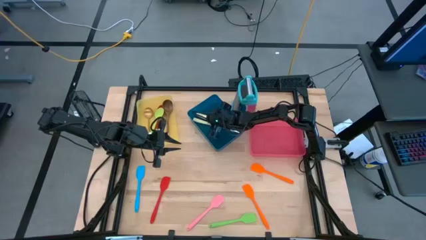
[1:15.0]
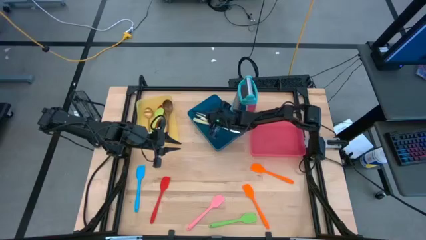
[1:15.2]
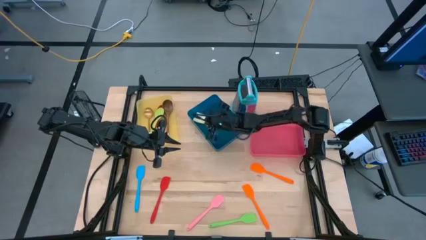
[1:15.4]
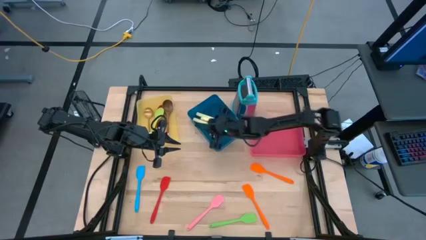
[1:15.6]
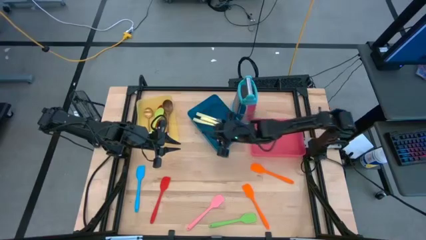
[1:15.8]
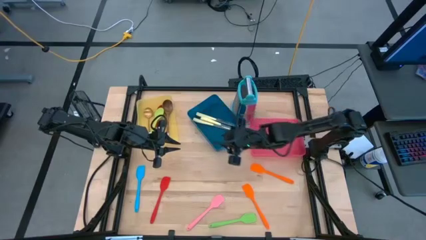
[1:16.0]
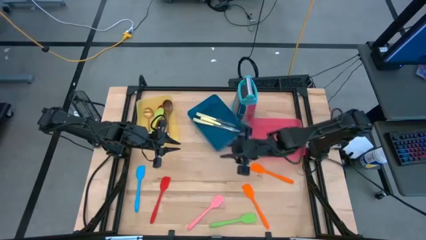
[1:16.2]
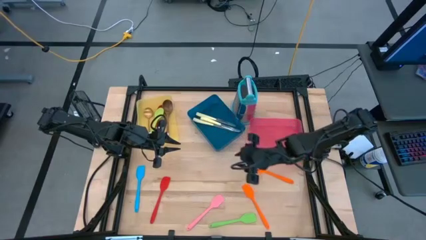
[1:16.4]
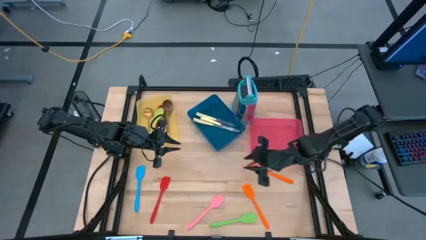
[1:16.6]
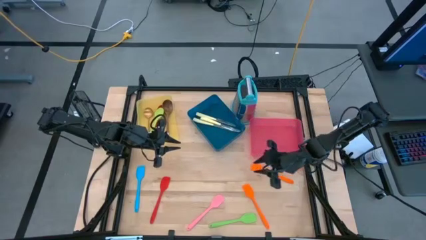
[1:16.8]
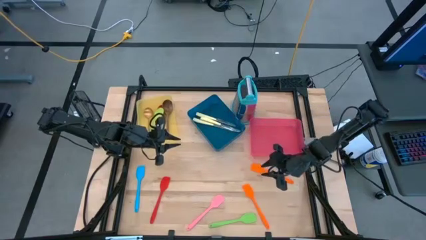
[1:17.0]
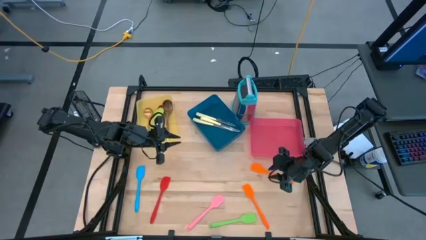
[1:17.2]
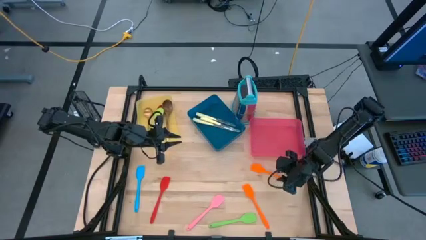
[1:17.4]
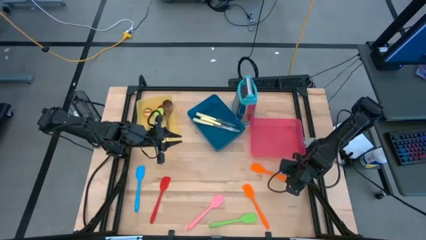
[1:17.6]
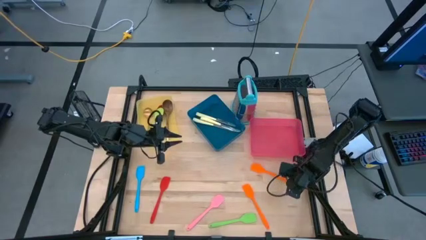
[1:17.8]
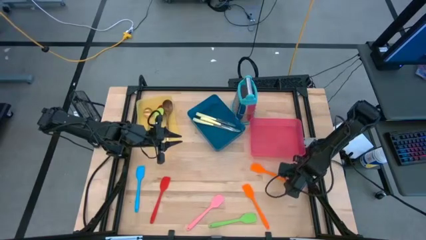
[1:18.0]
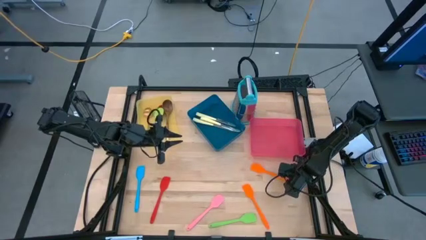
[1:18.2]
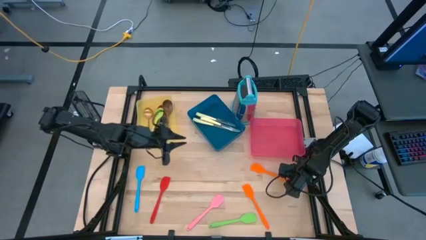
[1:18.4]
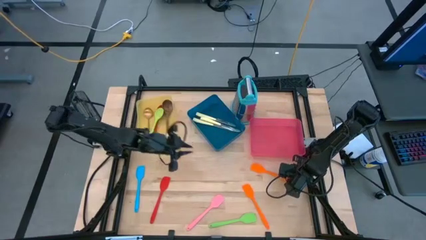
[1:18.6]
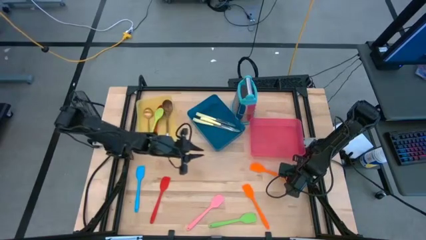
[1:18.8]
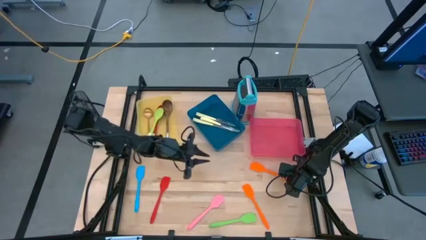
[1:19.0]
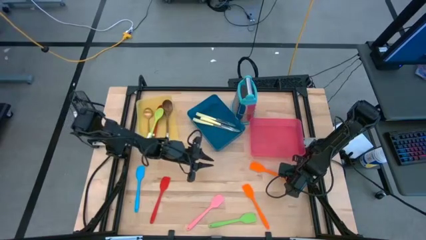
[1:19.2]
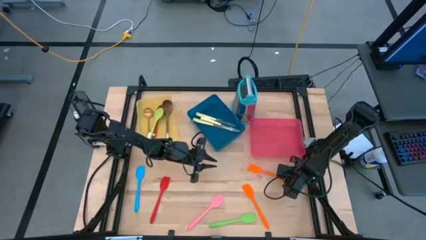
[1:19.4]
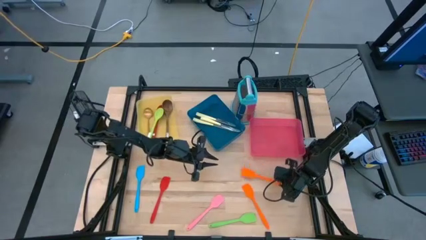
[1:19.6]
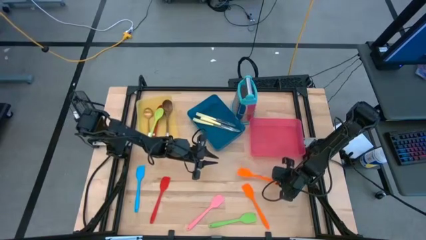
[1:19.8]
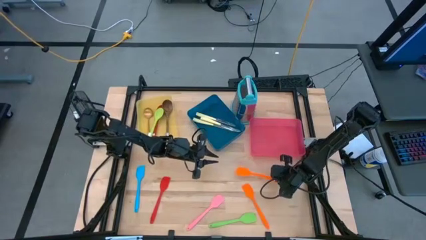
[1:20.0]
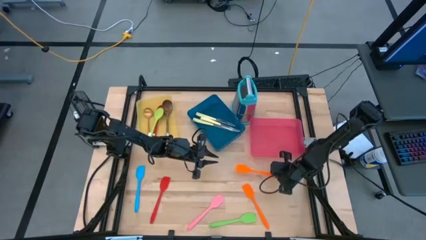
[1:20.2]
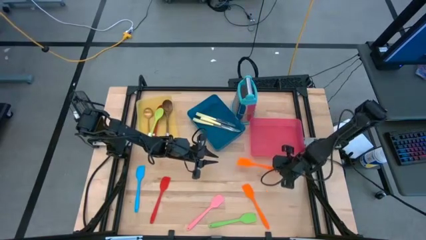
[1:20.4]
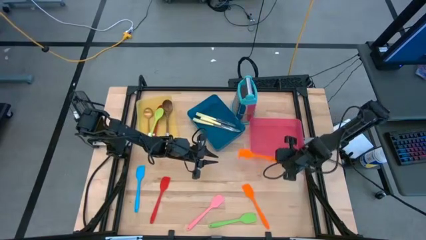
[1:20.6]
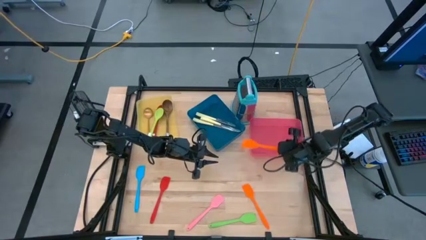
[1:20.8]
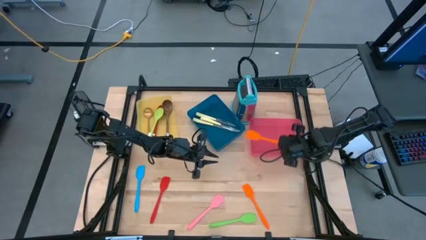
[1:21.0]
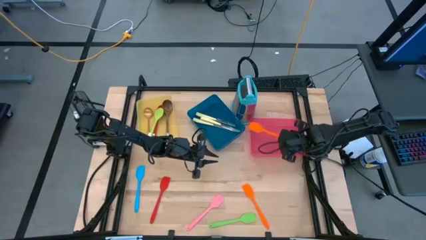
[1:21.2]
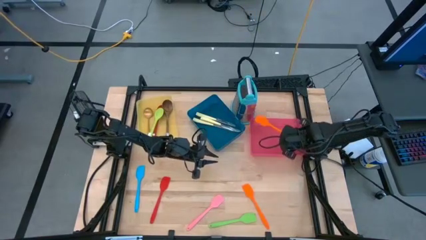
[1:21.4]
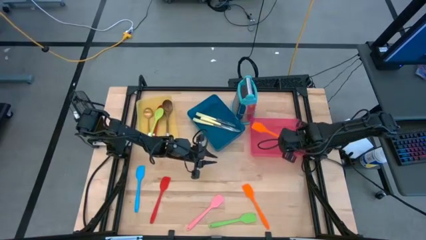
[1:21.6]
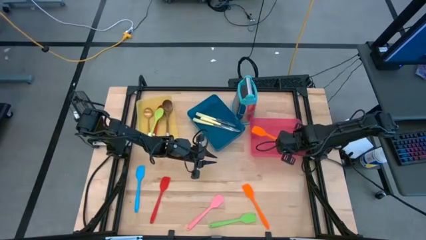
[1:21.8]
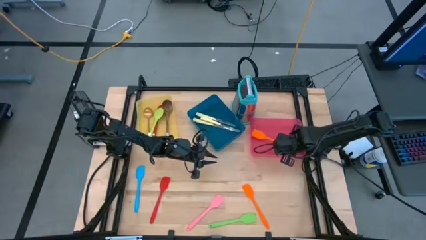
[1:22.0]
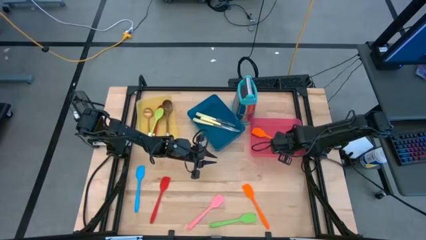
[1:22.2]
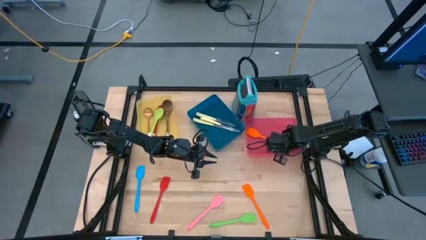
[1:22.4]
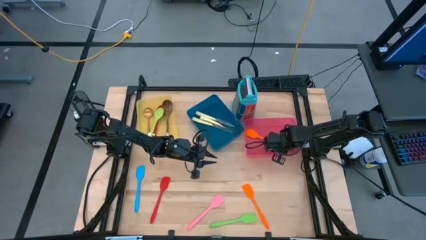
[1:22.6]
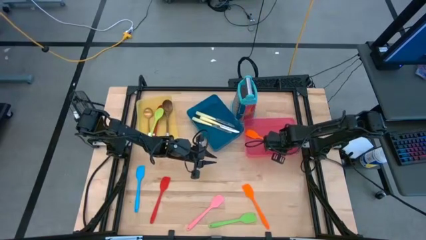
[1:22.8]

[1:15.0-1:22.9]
Task: Pick & Place Kitchen Items
Put the top orange spatula into the pink bin

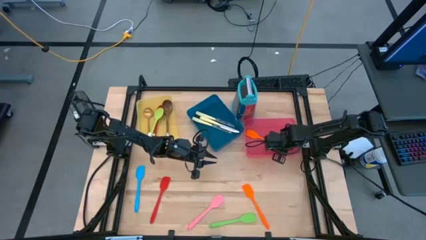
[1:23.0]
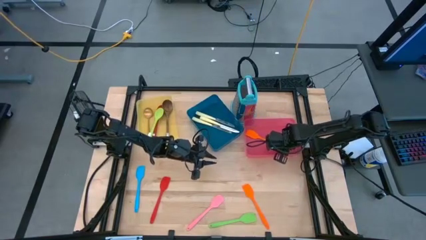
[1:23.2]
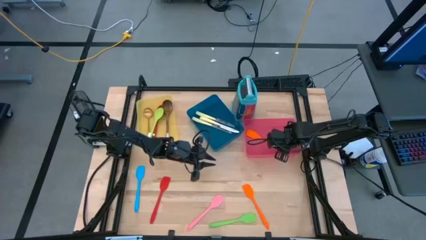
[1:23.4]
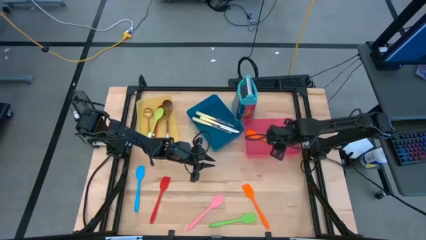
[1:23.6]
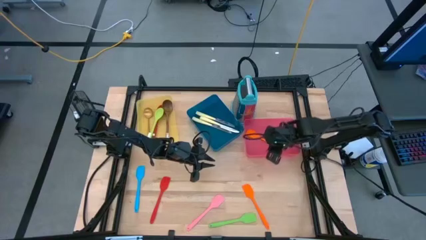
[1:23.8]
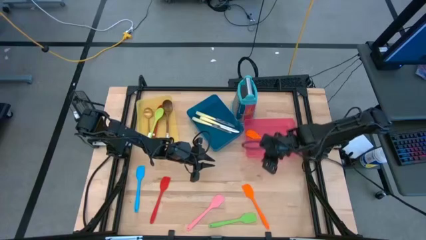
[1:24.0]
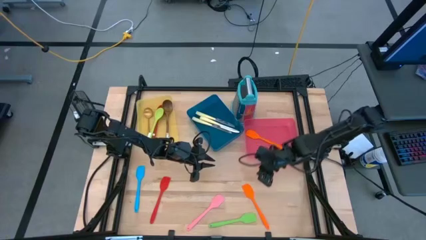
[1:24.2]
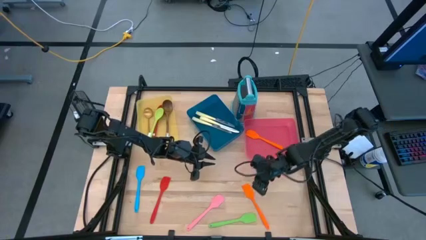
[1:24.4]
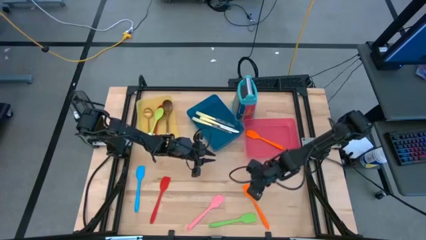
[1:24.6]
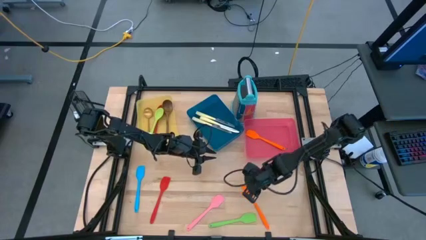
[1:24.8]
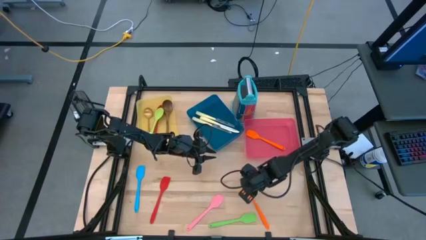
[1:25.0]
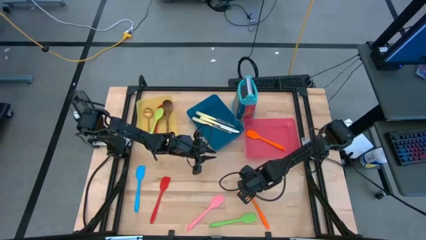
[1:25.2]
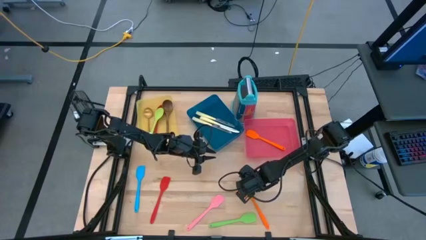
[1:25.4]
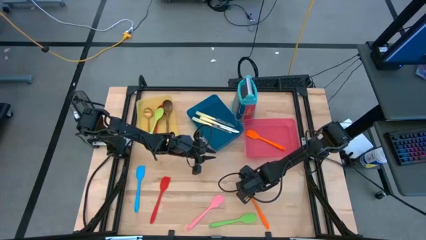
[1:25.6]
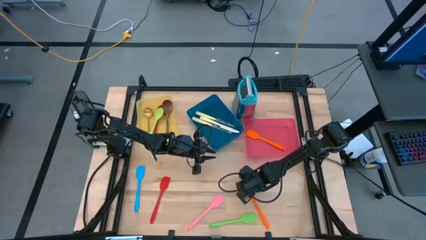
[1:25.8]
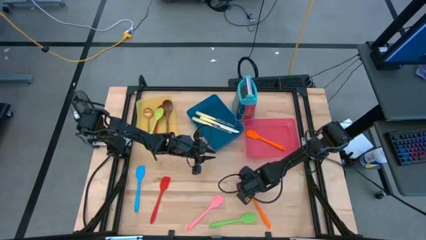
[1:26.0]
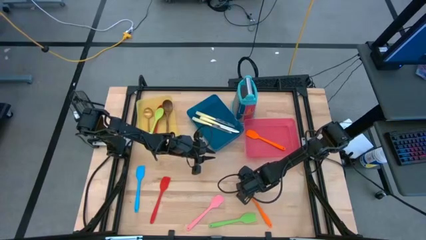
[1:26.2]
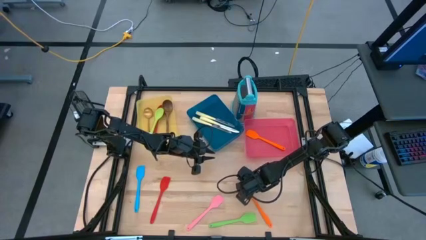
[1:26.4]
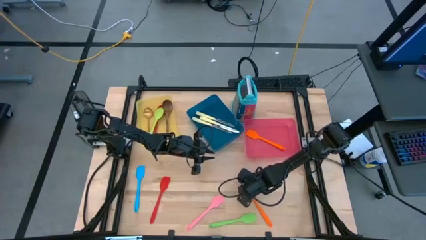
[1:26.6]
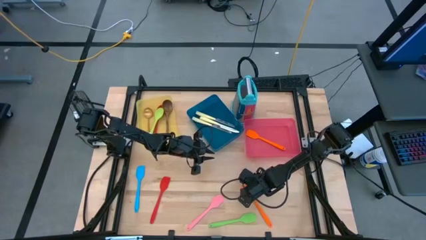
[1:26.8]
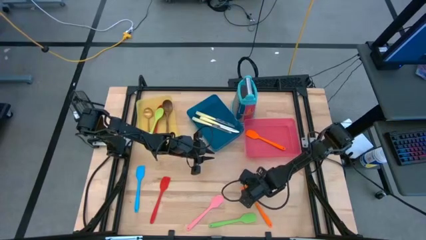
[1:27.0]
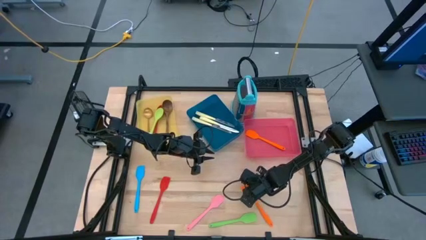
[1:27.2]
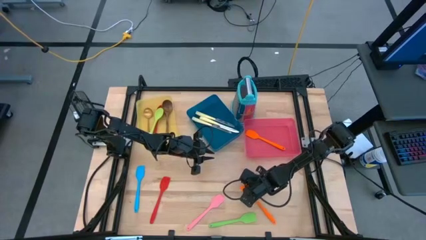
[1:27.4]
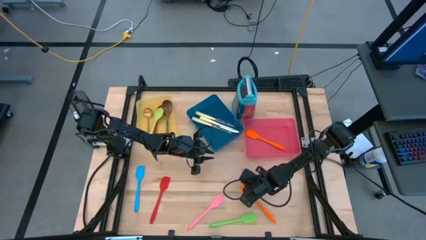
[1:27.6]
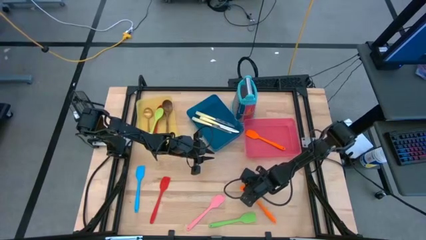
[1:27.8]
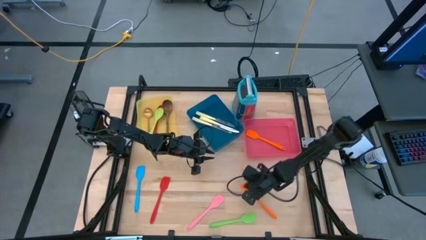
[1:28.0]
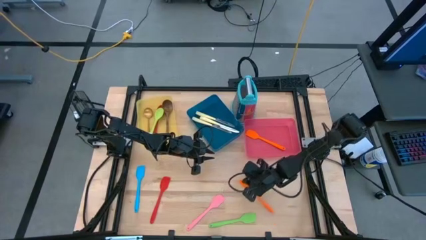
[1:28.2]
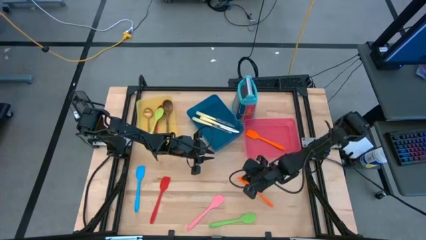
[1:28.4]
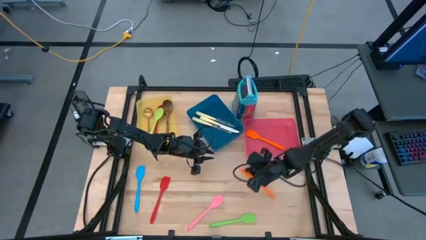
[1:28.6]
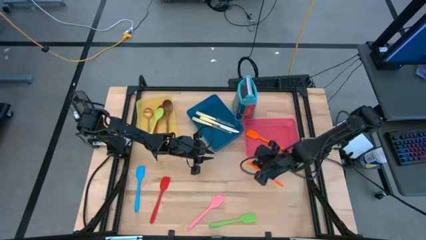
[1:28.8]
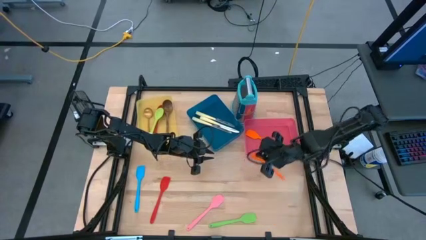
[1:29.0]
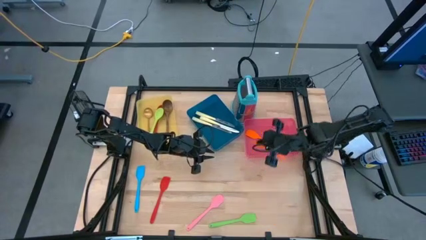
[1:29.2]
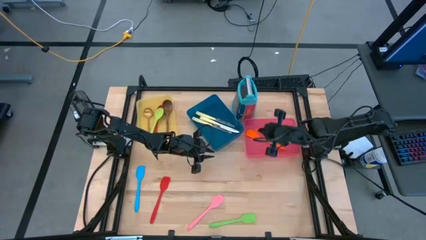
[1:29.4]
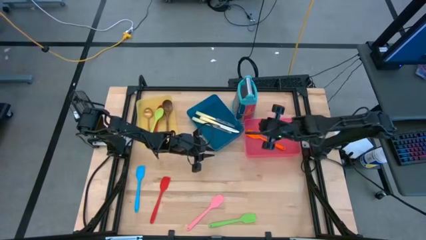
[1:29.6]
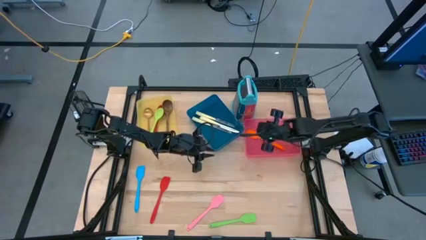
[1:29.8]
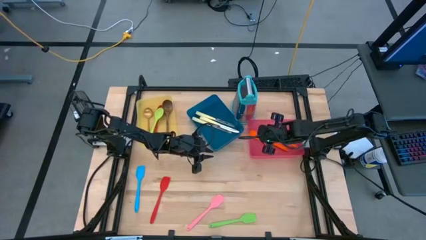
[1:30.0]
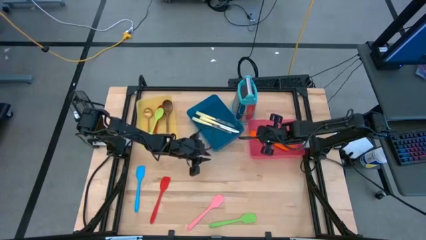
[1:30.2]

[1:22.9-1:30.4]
Put the orange spatula into the pink bin
